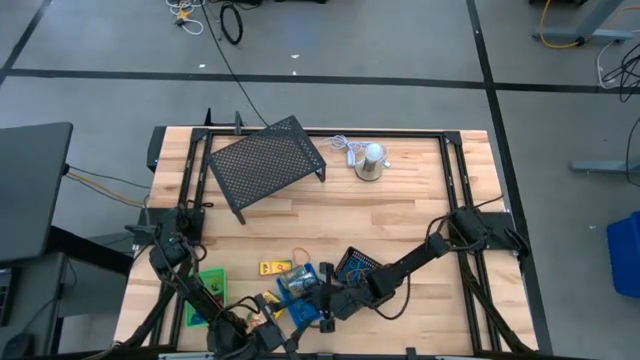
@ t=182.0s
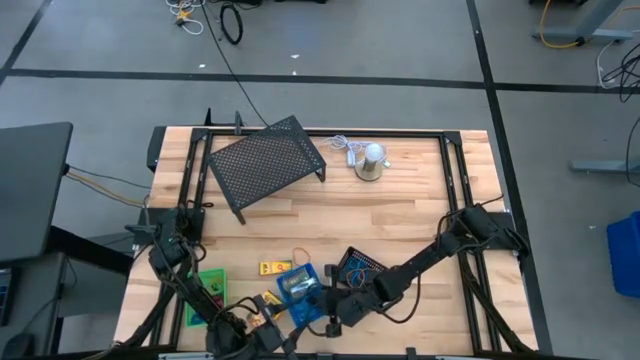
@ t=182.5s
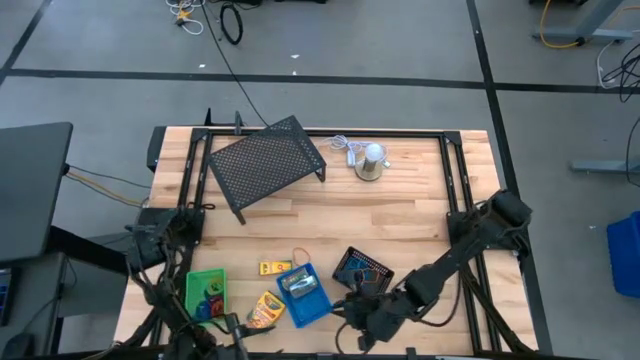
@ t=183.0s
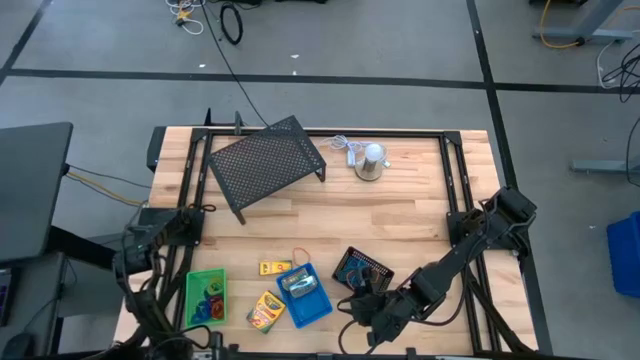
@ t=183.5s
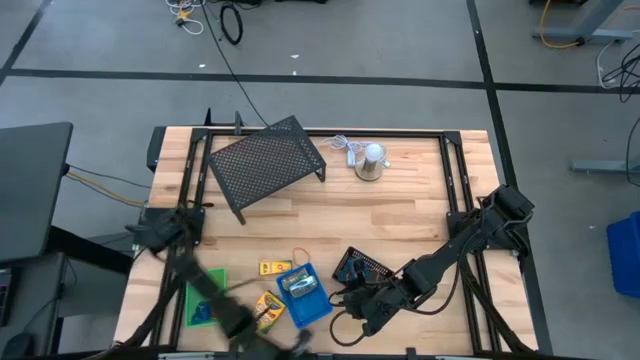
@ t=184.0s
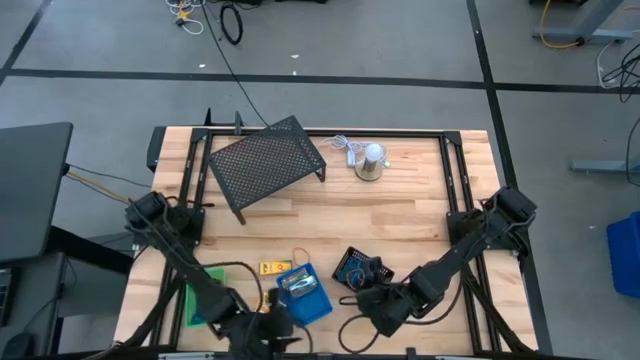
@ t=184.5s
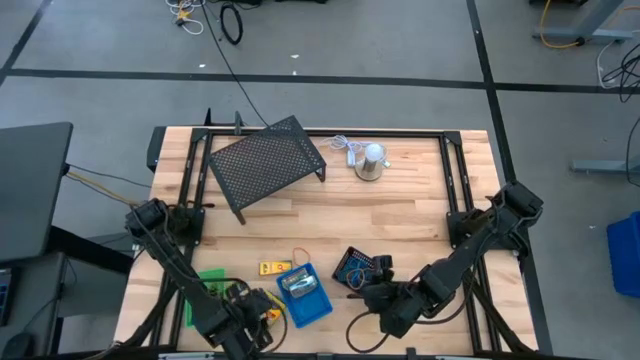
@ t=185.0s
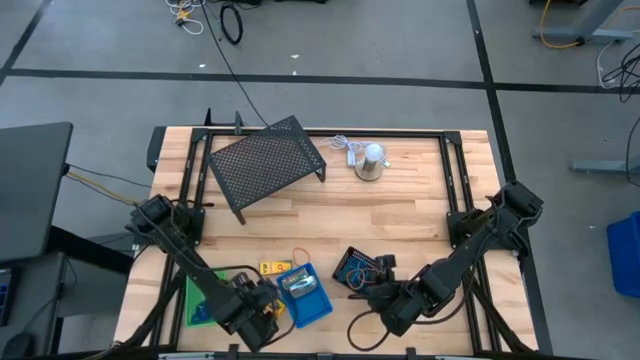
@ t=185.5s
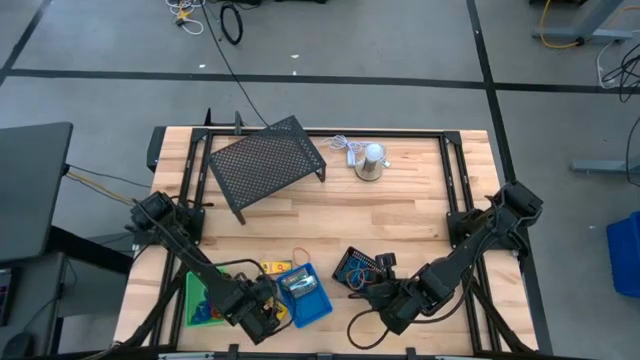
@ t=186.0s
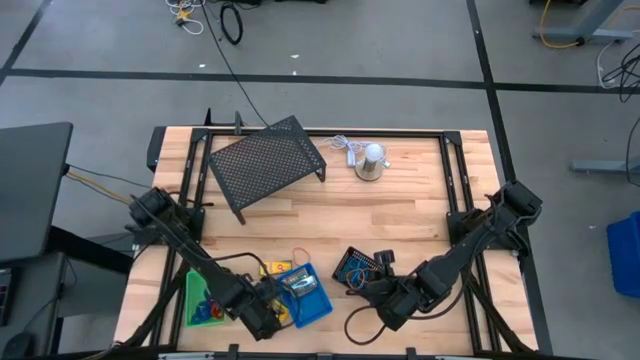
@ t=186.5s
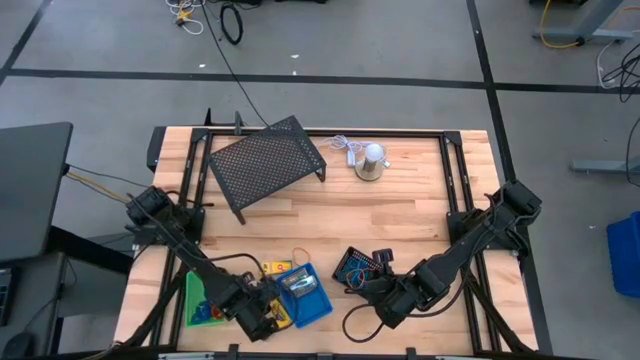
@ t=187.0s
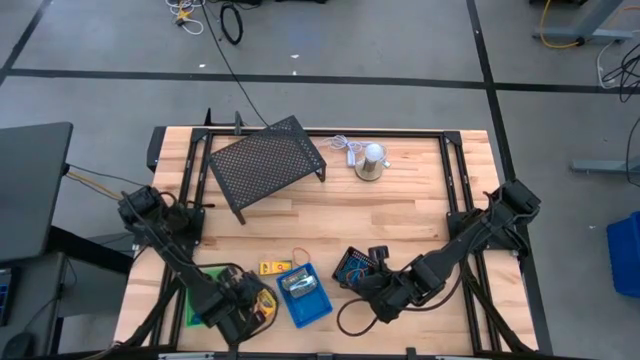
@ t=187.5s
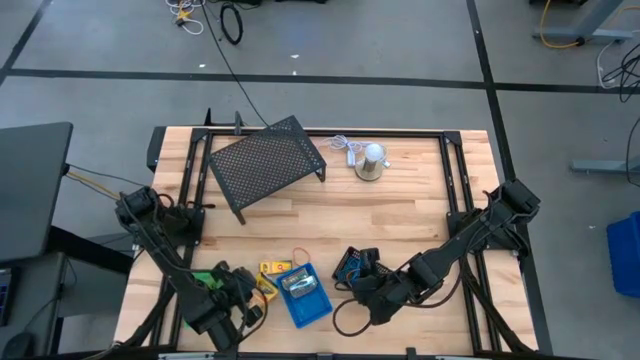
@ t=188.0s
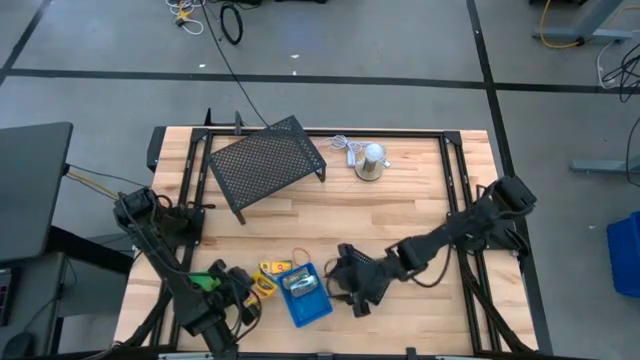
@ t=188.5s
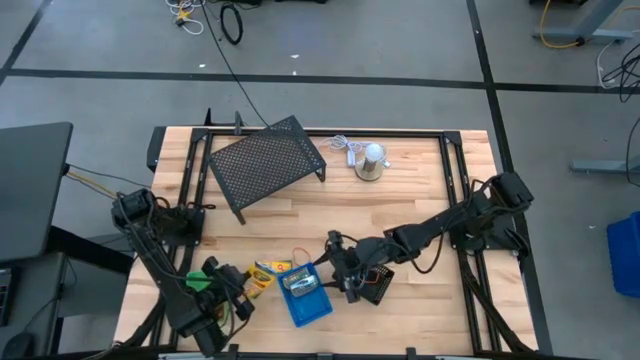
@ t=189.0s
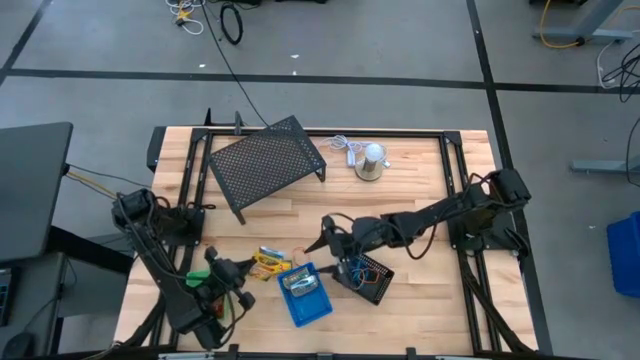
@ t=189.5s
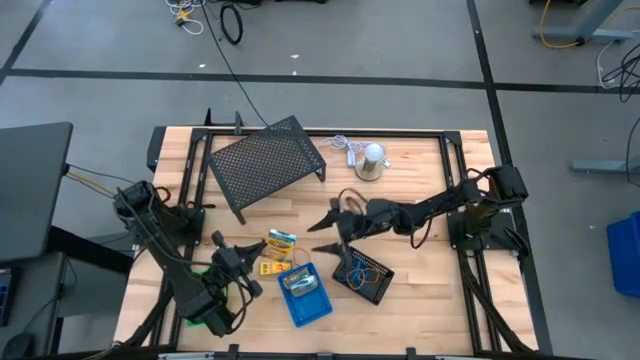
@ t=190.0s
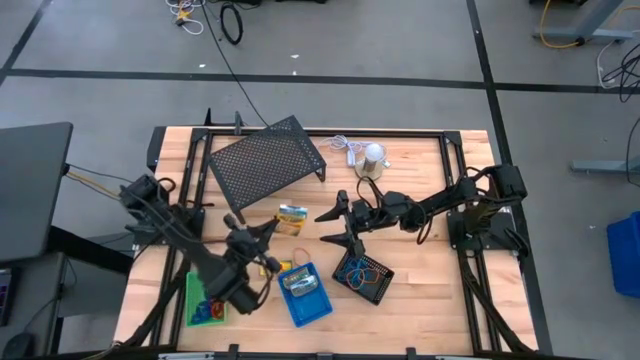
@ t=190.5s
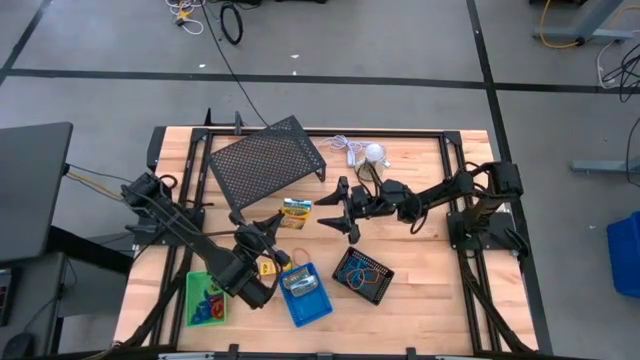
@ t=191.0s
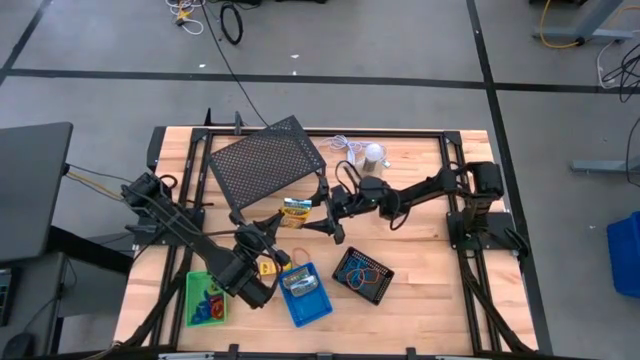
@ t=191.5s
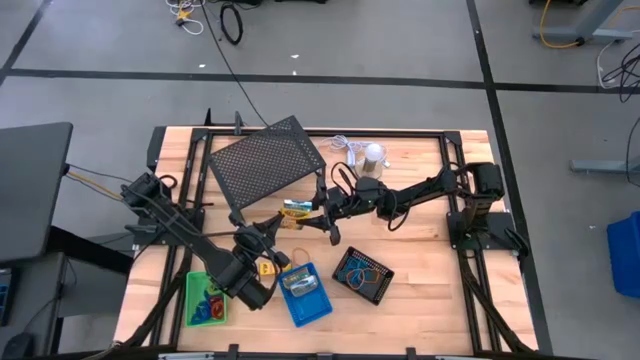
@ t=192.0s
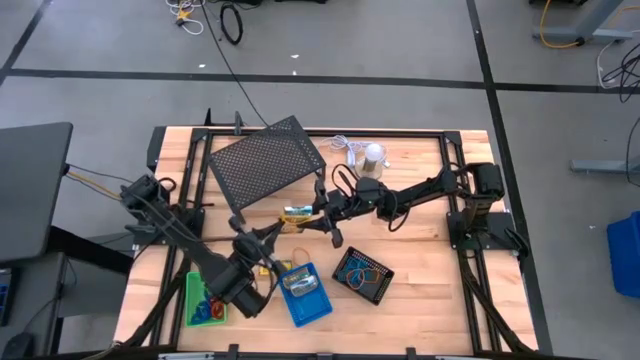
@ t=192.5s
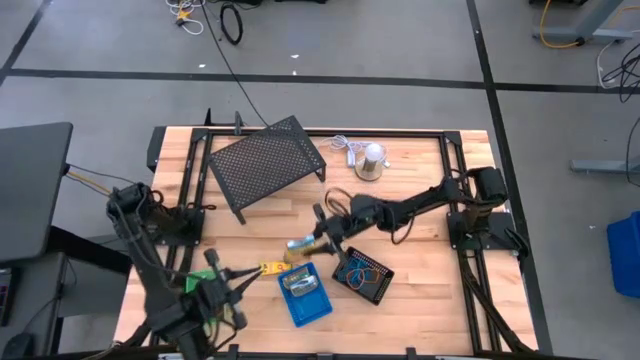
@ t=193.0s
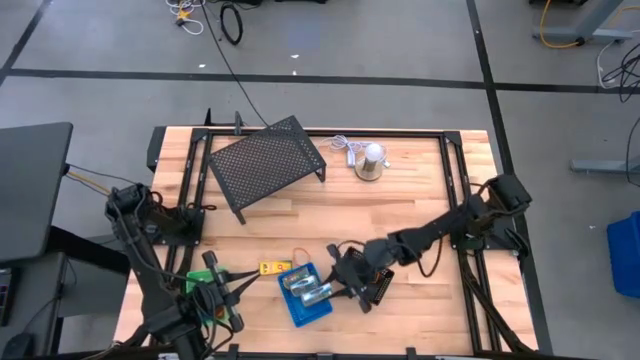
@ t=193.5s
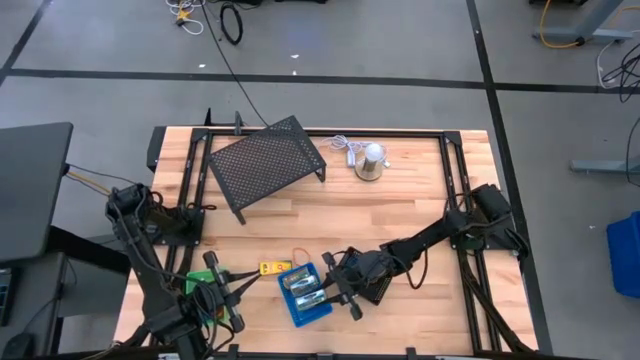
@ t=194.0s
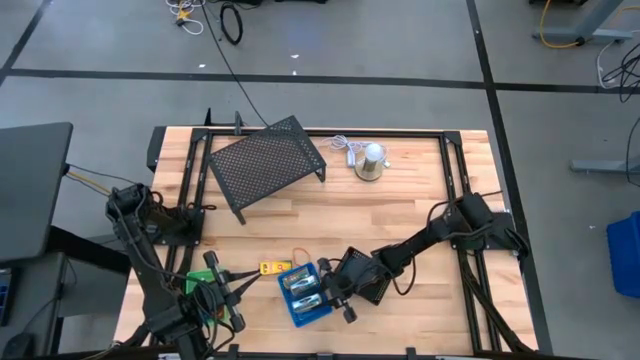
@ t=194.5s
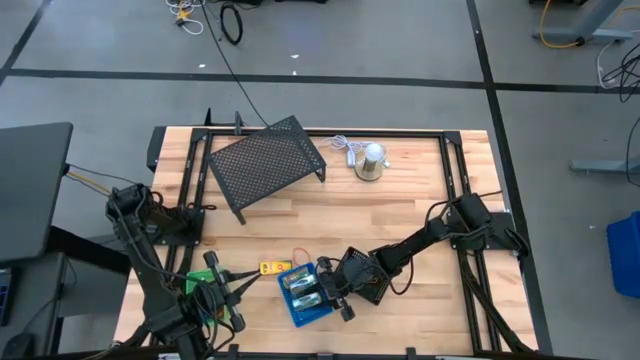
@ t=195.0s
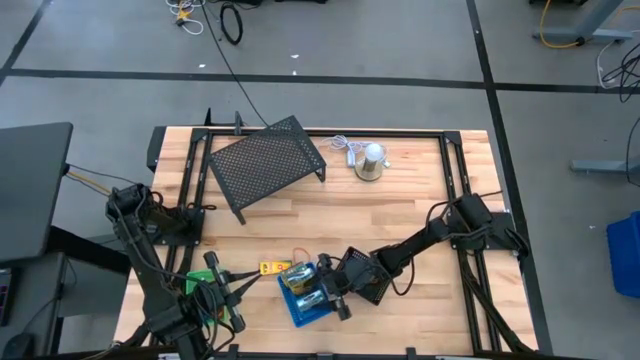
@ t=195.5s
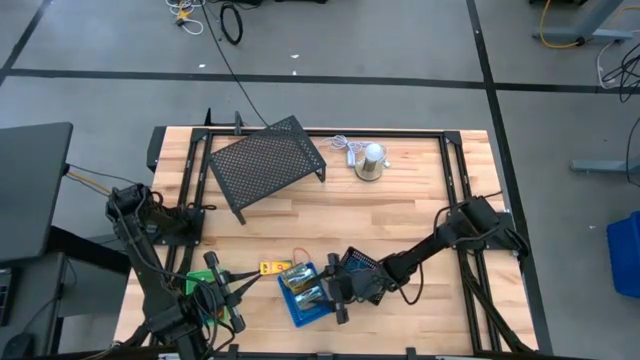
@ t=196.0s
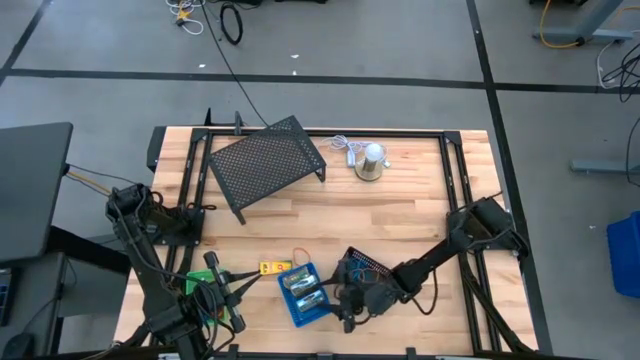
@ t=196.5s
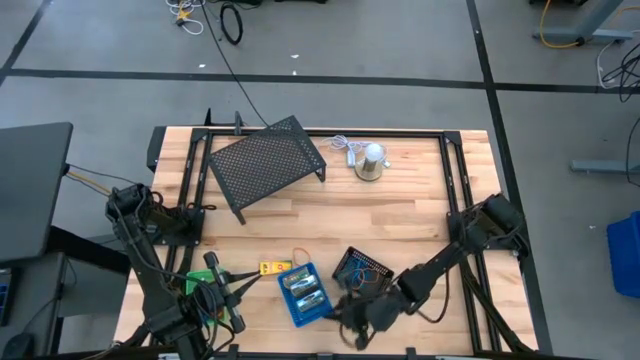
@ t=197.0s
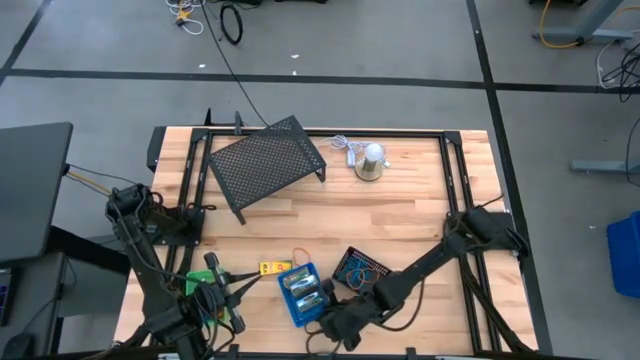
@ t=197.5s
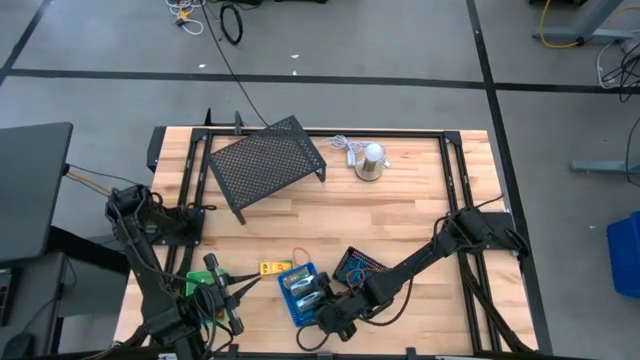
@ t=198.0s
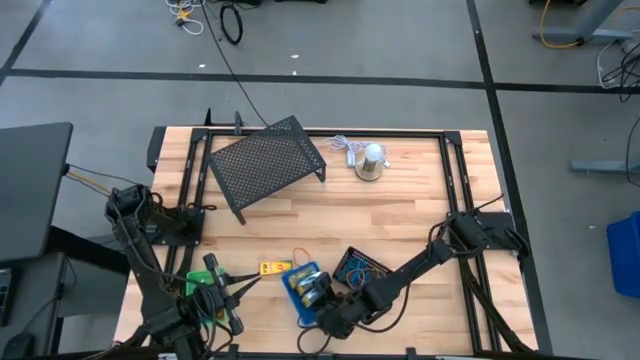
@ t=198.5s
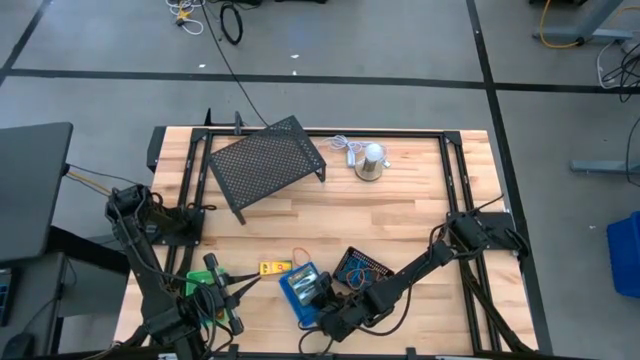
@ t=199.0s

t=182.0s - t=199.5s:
Task: Pick & Place Office Desk Supplies
Put the yellow crayon box into the blue bin

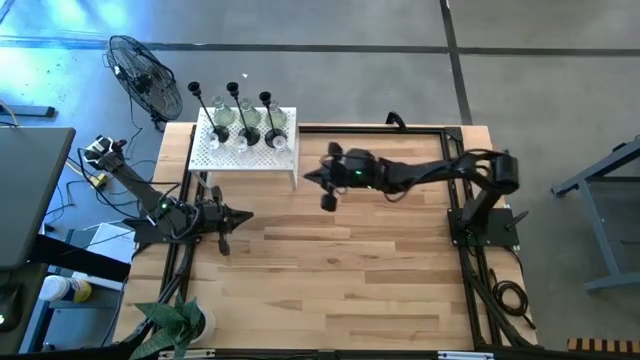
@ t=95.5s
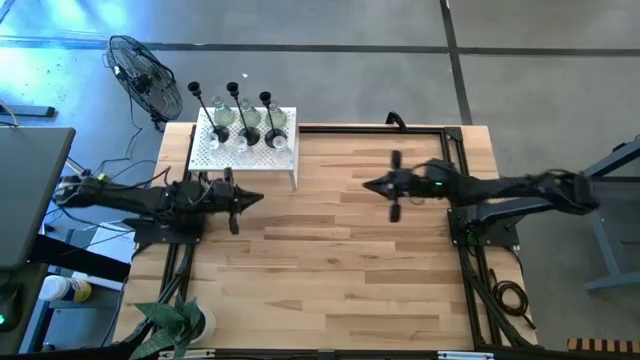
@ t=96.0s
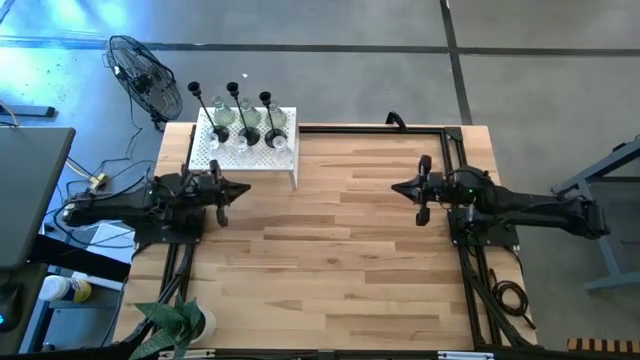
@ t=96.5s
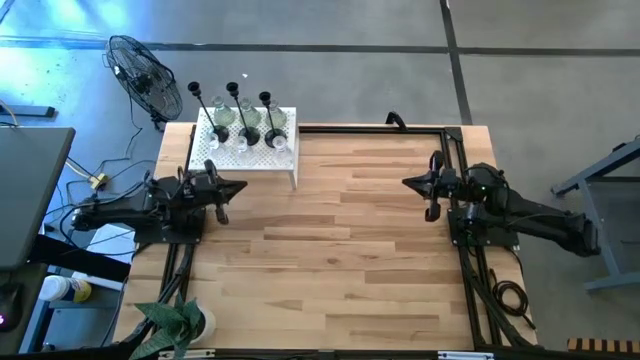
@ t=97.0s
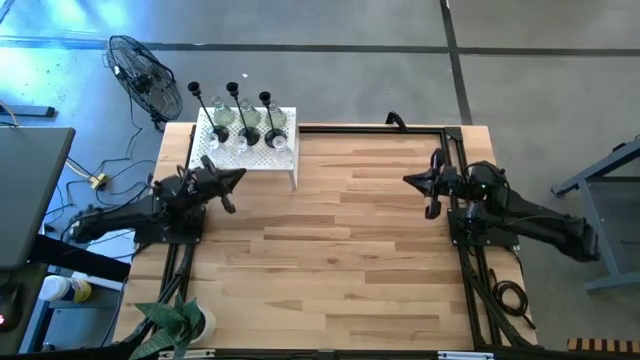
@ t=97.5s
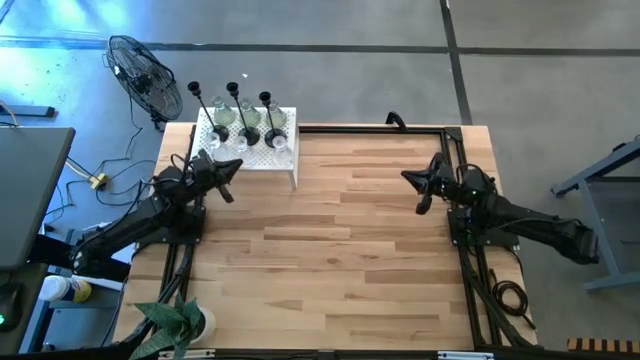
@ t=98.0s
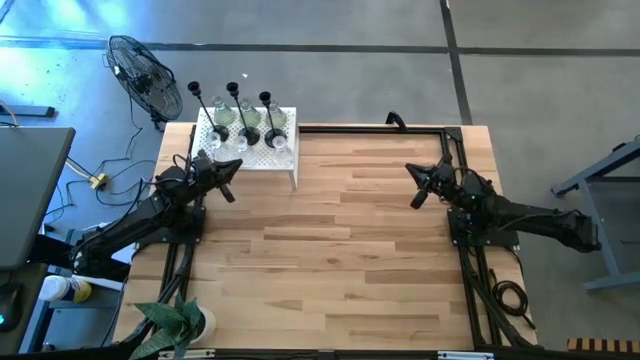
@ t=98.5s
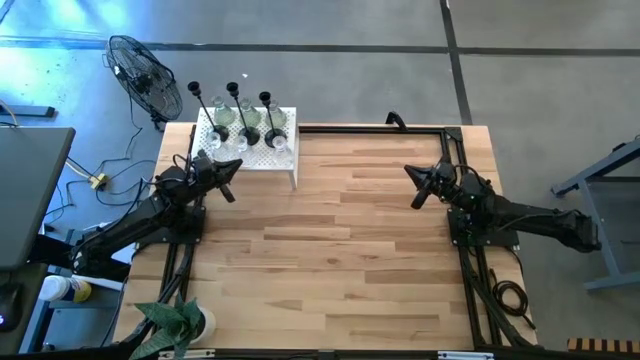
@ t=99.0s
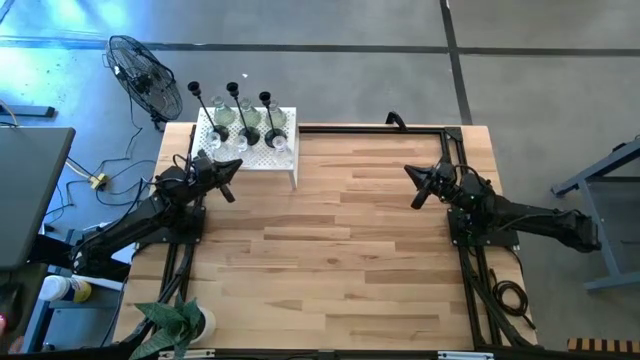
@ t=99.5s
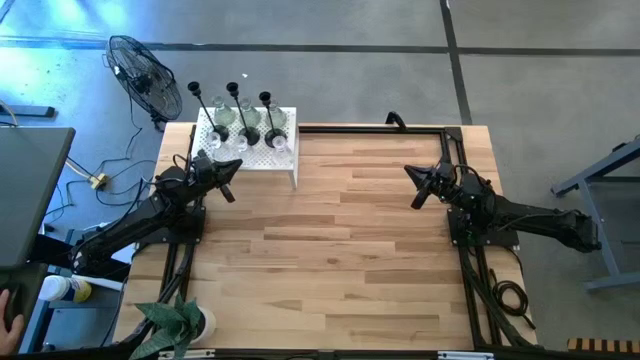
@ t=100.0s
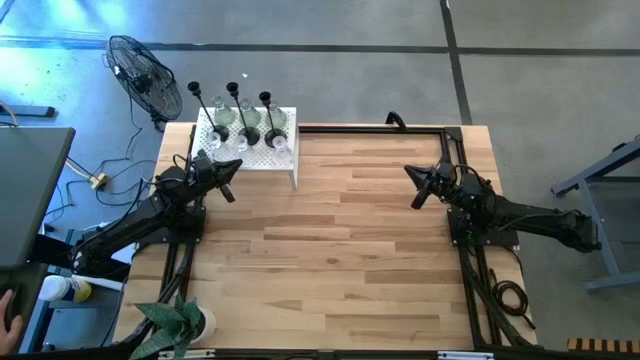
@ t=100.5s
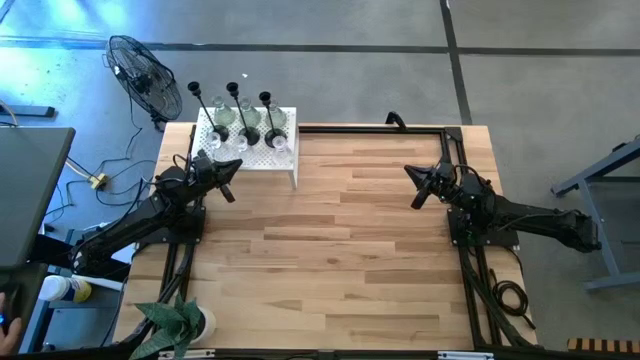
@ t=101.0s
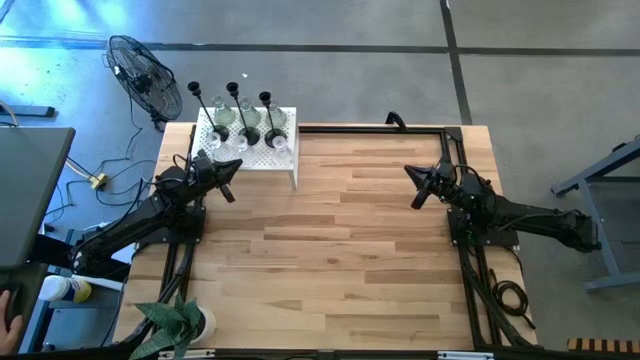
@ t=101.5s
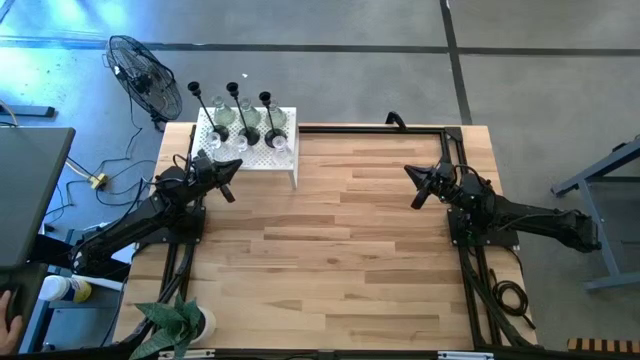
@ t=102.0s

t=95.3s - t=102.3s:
Task: Pick & Place candle stick holders
Return to Home Position
